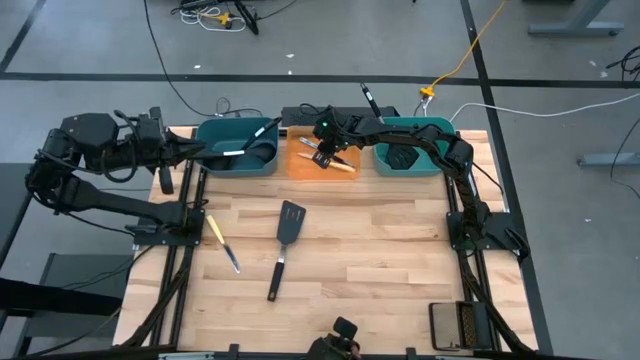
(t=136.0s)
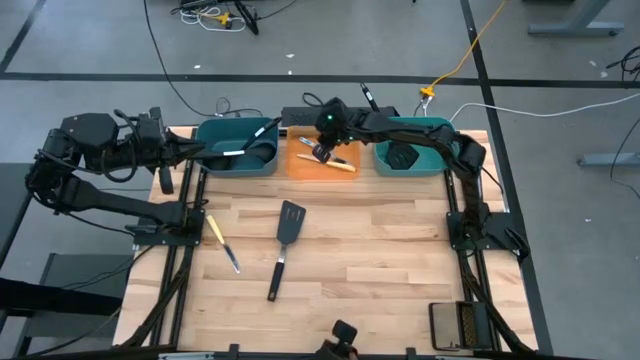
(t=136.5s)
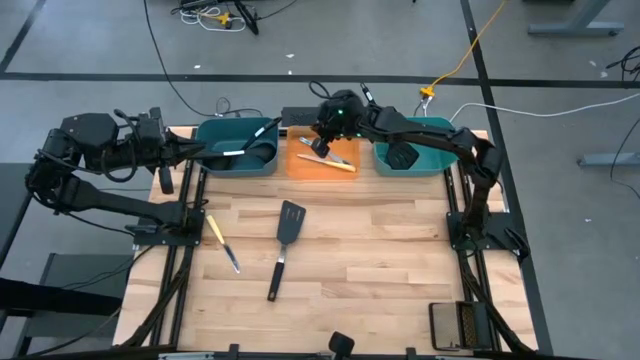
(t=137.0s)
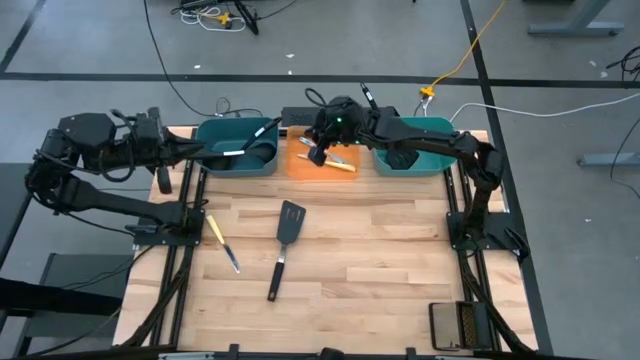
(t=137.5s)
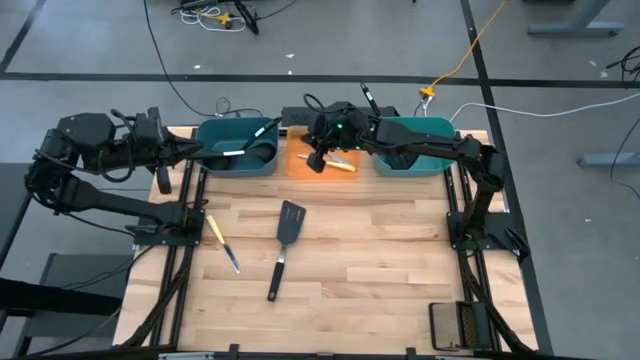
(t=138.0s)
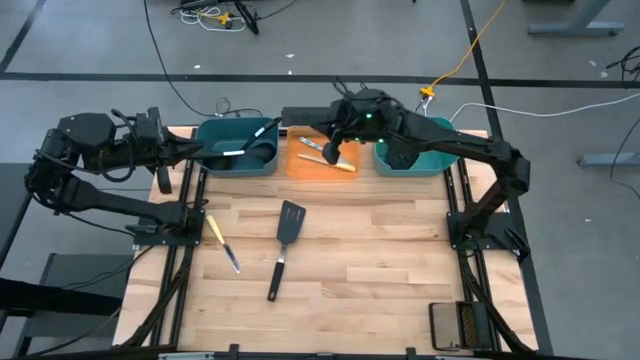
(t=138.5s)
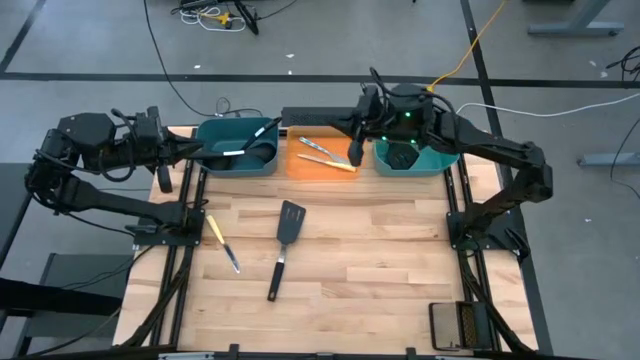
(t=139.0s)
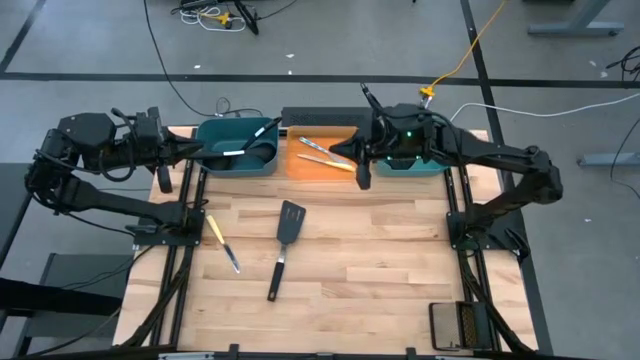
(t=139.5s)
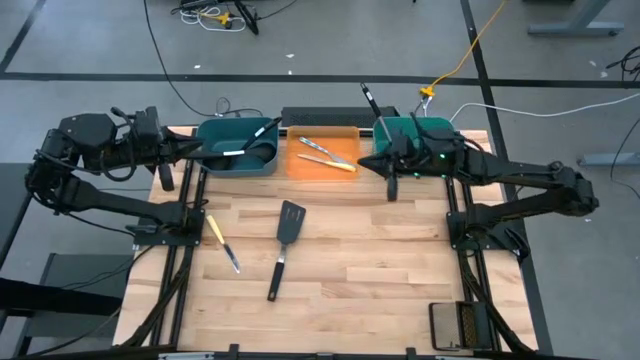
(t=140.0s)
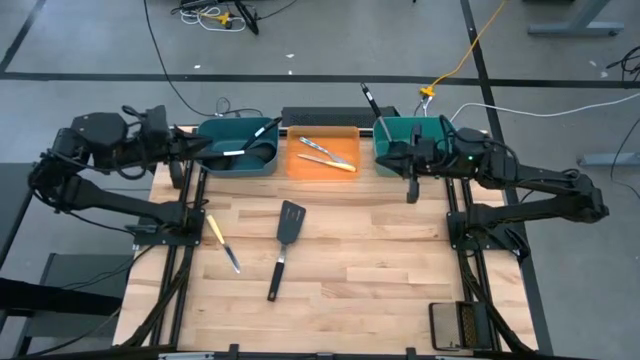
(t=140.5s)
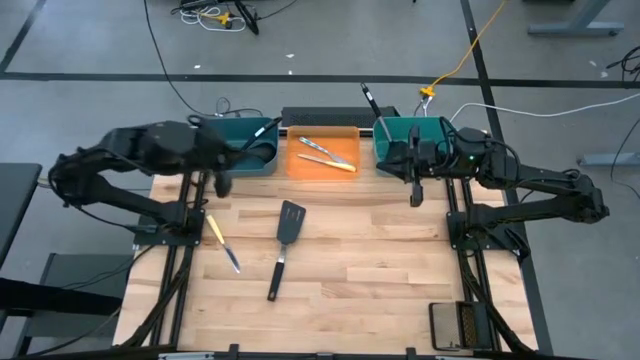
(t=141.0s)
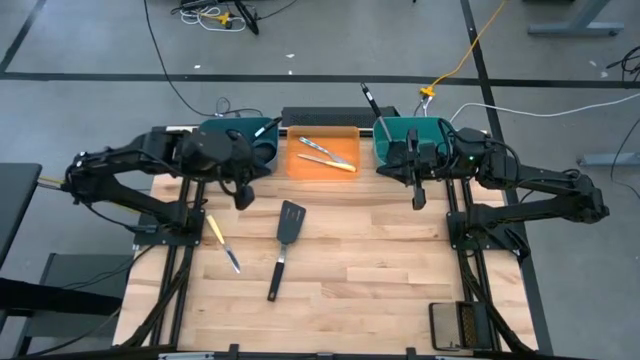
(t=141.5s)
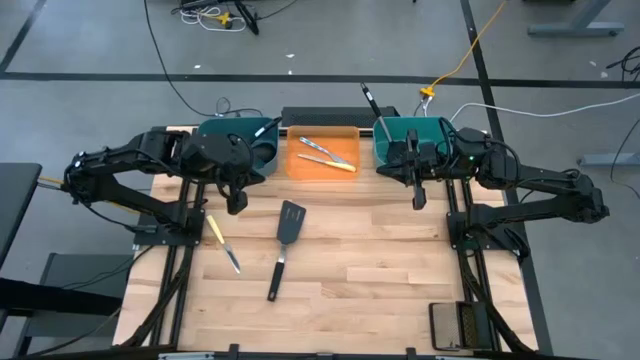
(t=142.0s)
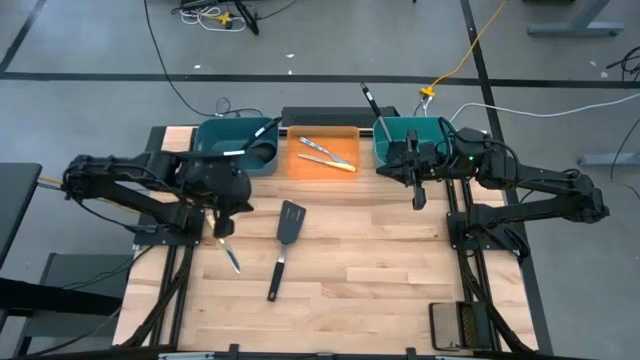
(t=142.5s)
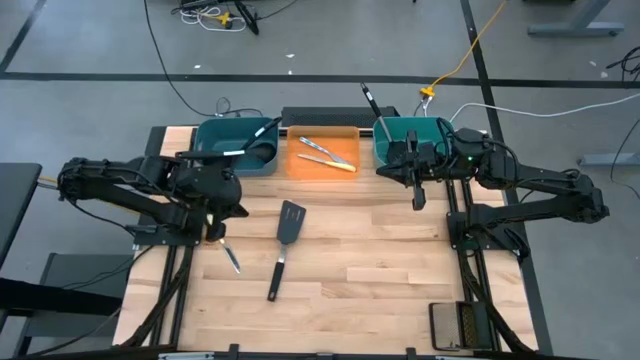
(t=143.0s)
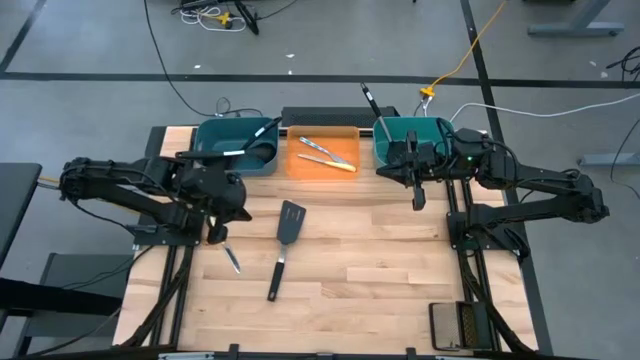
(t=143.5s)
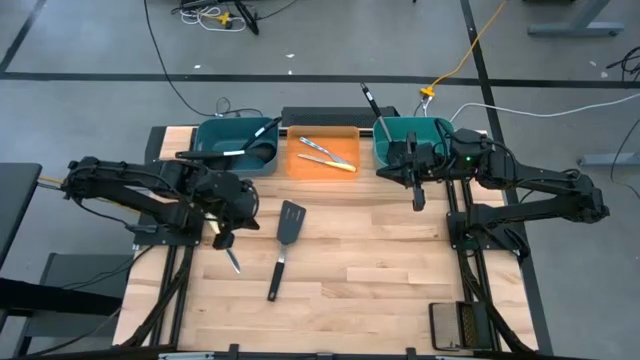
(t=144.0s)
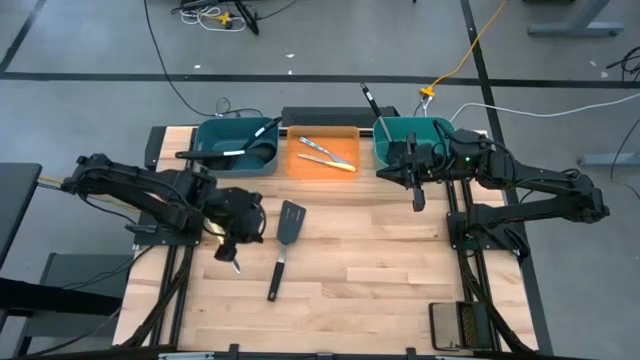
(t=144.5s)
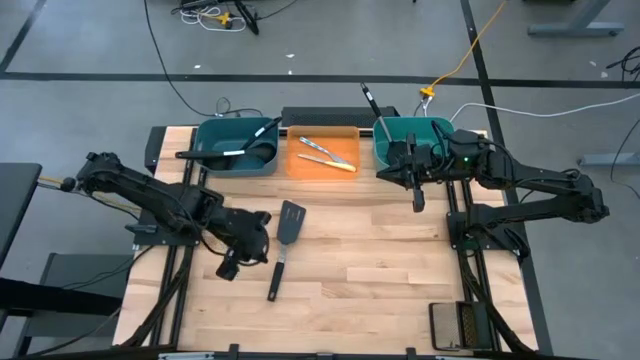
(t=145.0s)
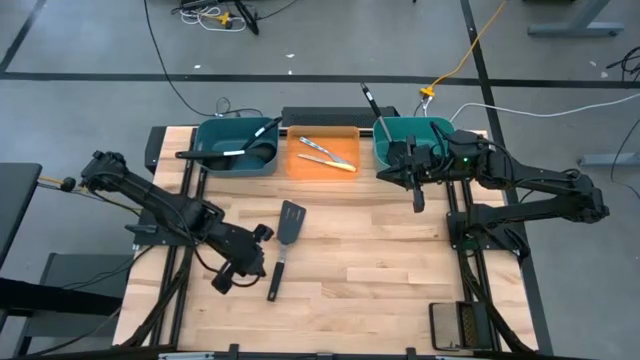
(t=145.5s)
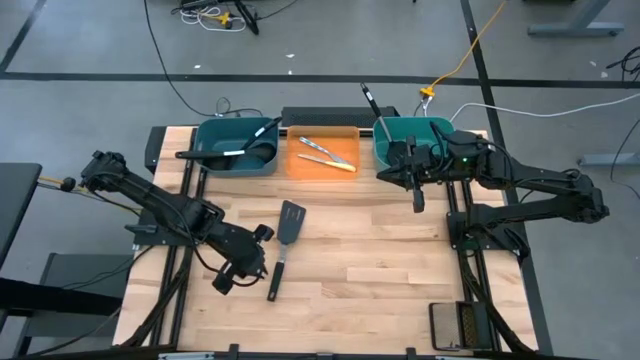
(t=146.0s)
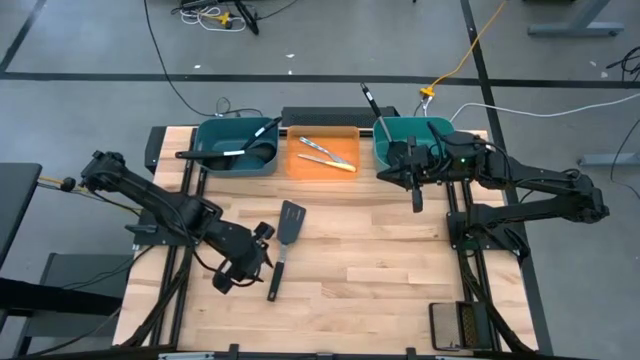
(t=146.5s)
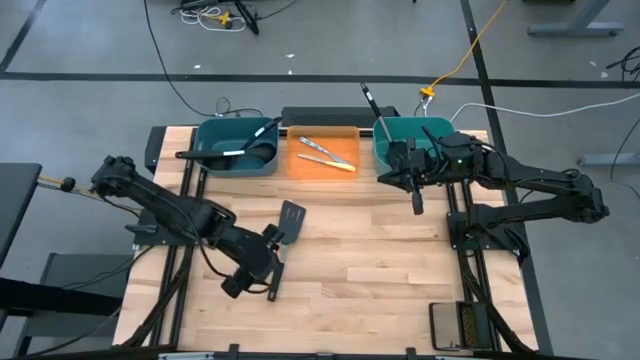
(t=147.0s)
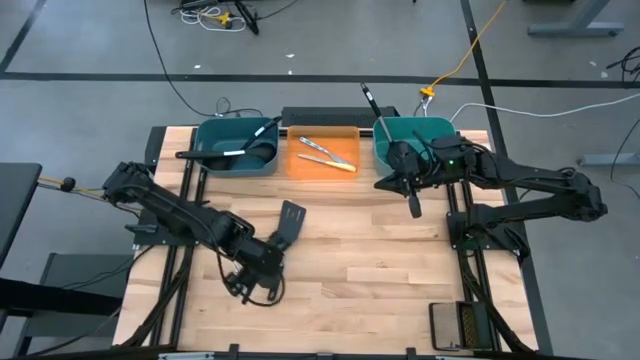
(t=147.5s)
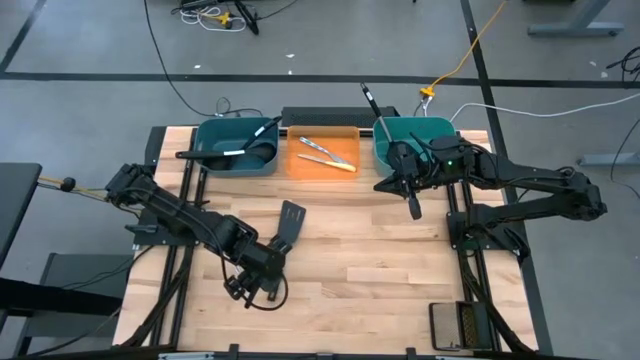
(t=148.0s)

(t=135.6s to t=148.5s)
Task: Pick & Place Kitchen Items
Put the black spatula into the green bin

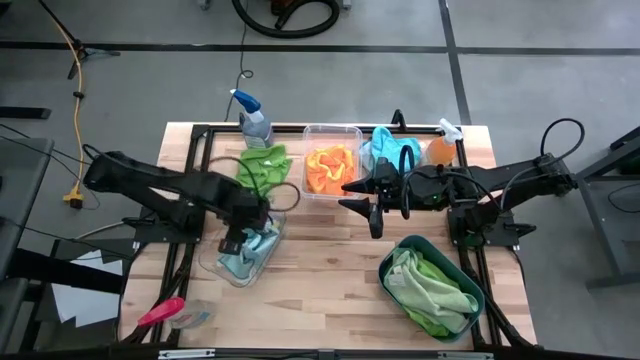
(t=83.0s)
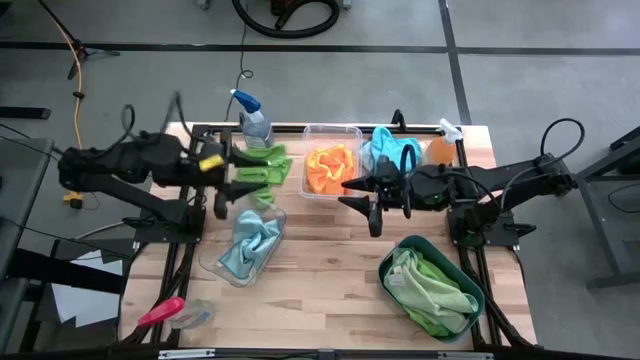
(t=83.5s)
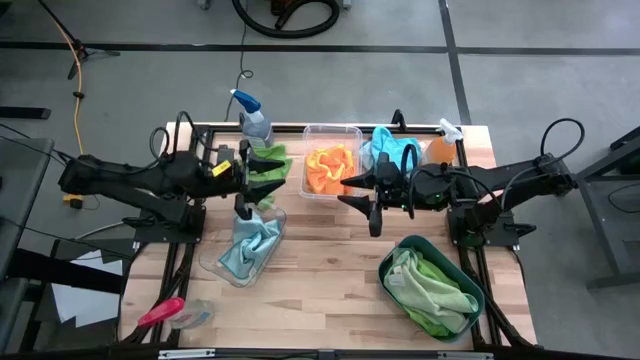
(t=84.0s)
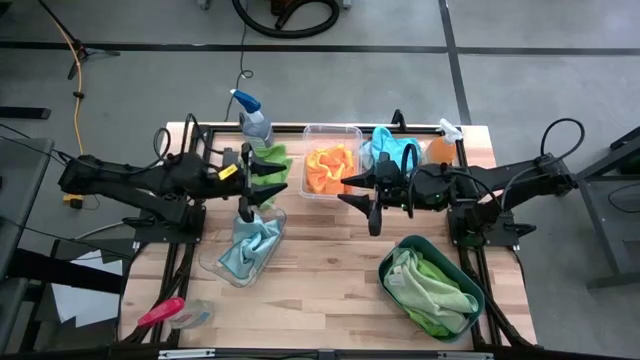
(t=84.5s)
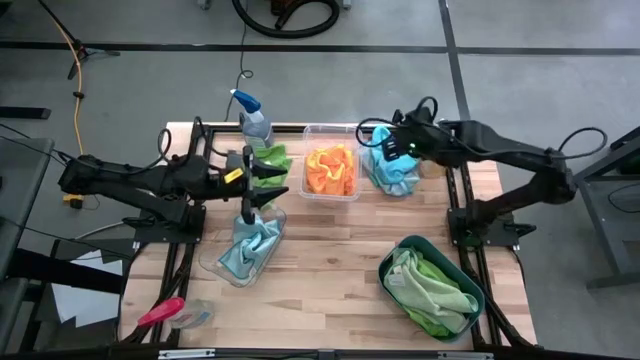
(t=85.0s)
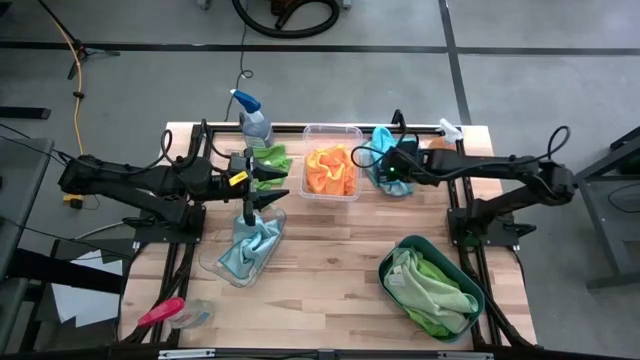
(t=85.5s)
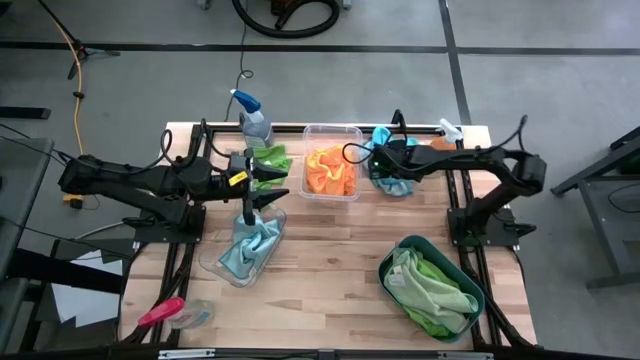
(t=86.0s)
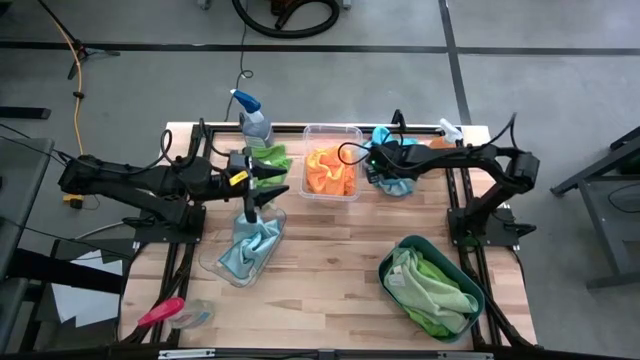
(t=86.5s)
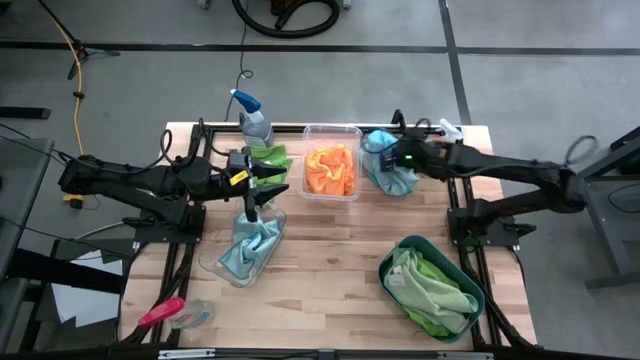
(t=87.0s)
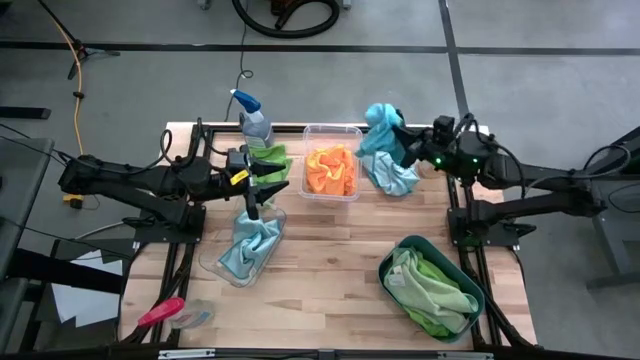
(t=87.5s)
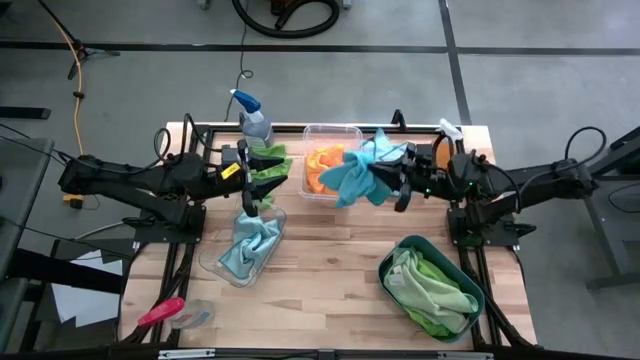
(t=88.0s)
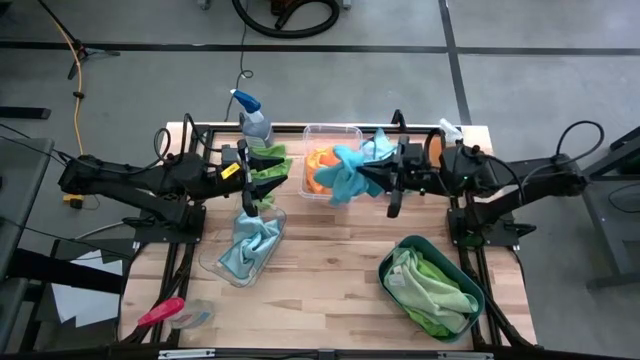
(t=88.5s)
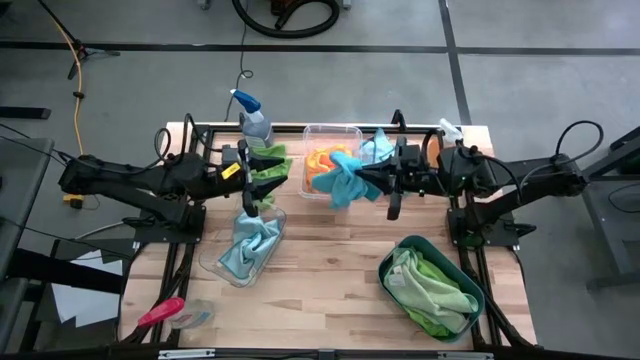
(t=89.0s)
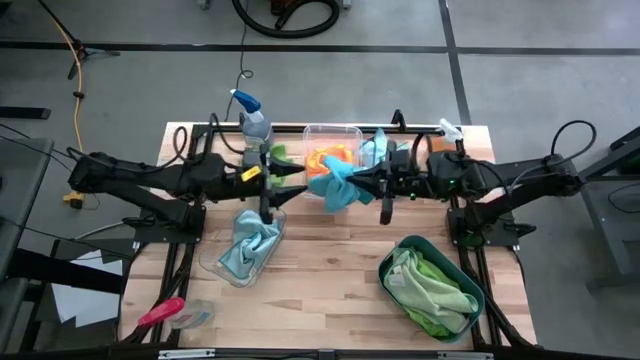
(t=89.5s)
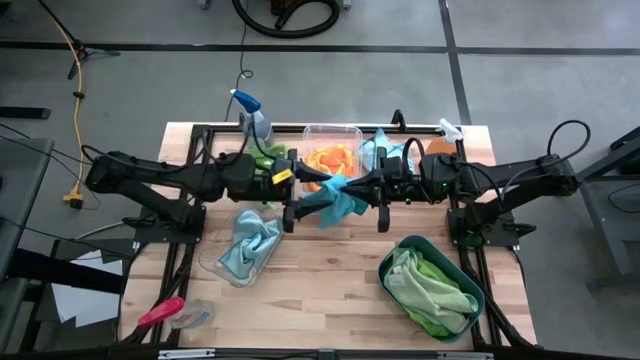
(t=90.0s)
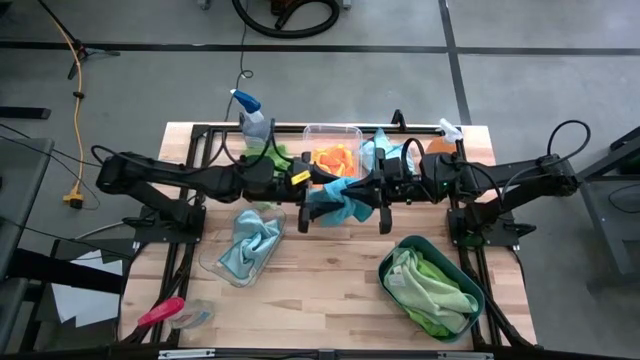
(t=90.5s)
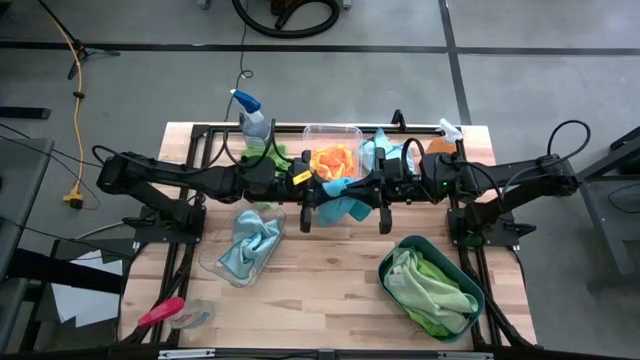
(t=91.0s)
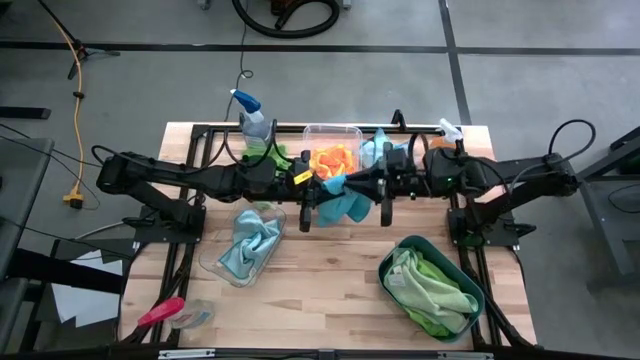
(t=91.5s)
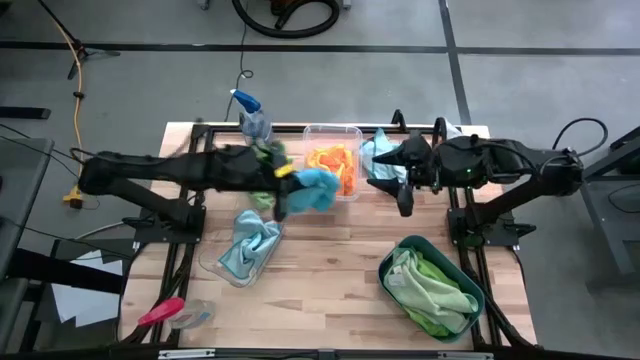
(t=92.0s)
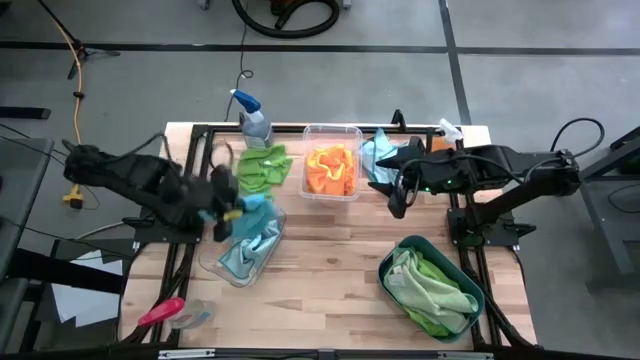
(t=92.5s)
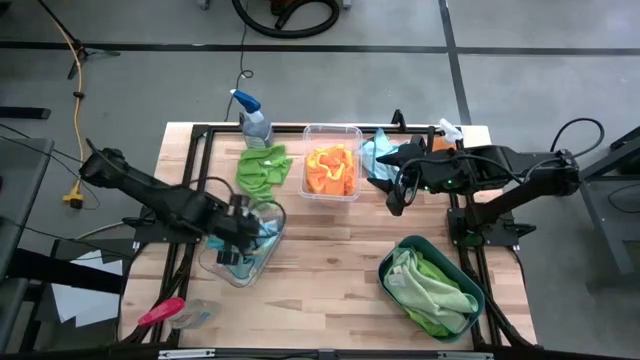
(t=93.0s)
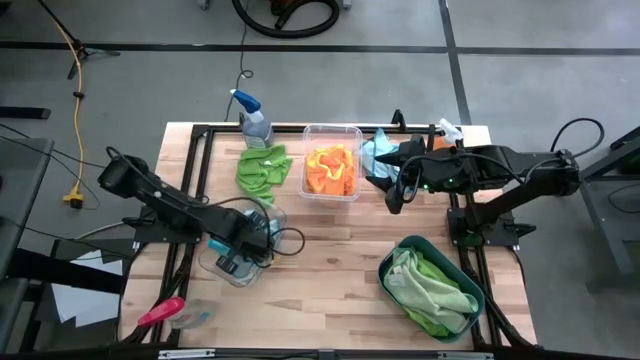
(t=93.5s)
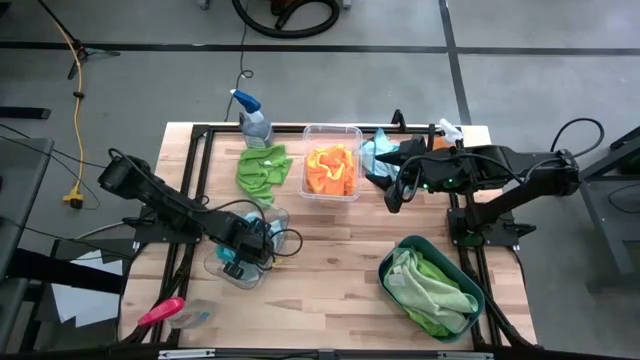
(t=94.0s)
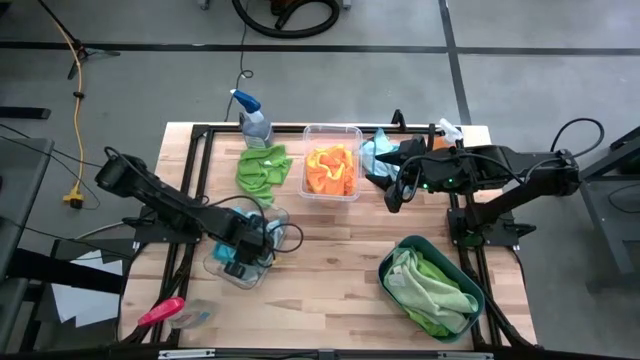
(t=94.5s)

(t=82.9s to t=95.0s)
Task: Sort microfiber towel by color & place in baskets
Put the blue microfiber towel into the bottom transparent bin
